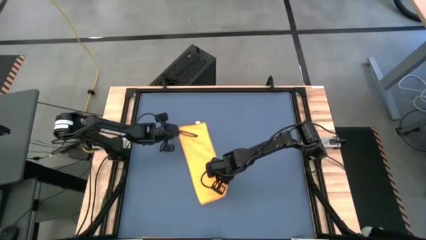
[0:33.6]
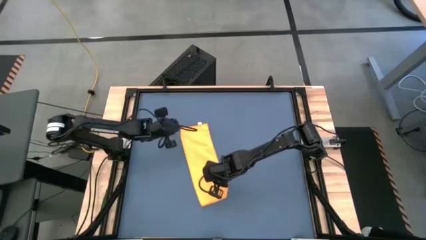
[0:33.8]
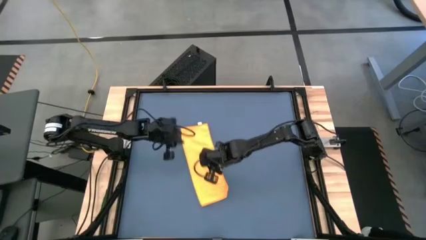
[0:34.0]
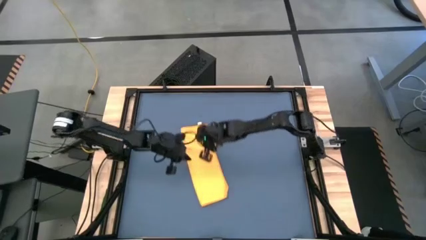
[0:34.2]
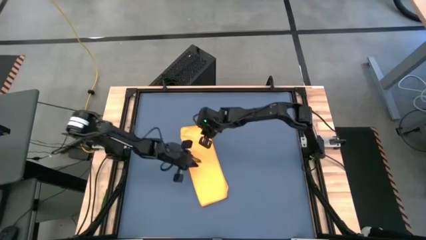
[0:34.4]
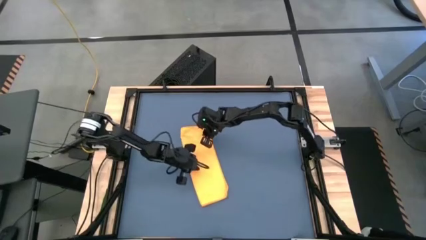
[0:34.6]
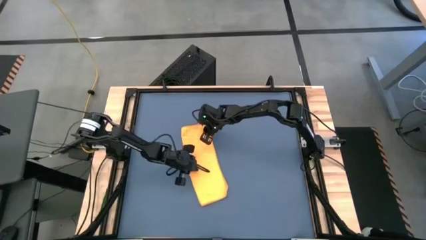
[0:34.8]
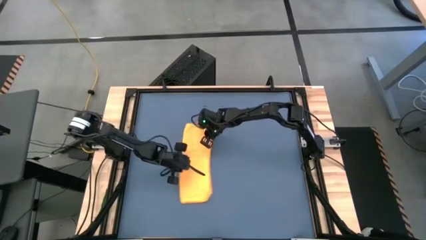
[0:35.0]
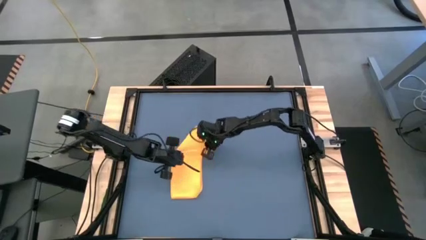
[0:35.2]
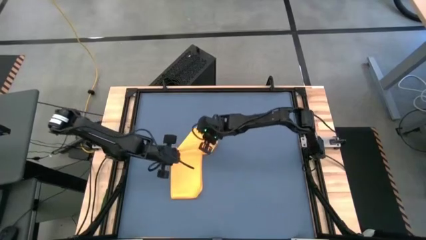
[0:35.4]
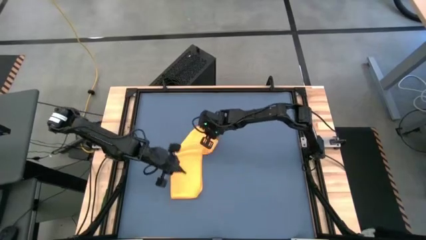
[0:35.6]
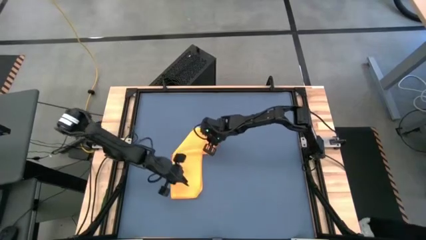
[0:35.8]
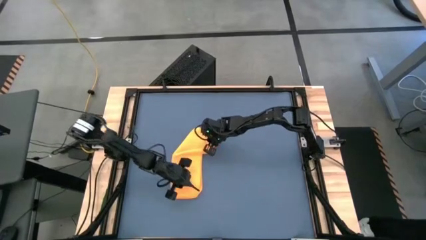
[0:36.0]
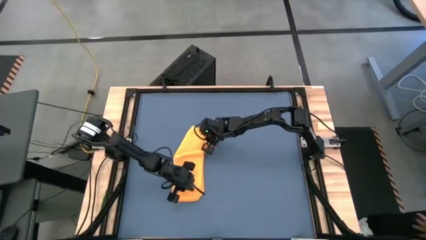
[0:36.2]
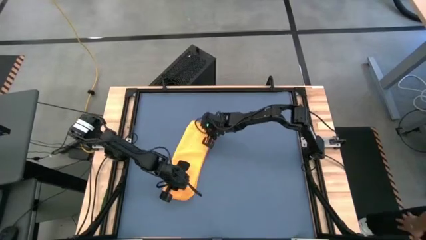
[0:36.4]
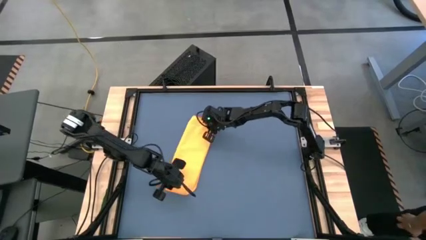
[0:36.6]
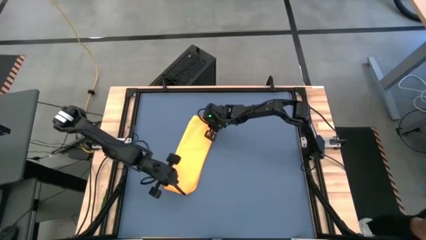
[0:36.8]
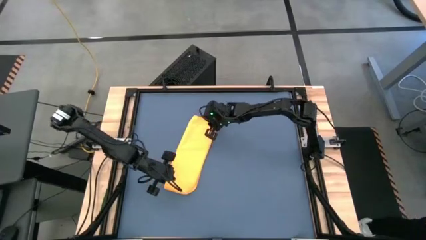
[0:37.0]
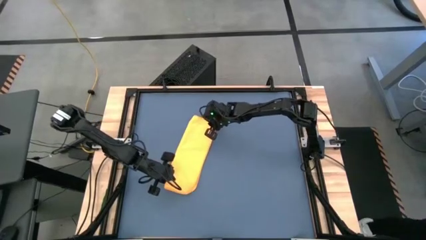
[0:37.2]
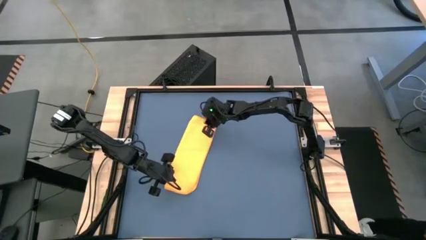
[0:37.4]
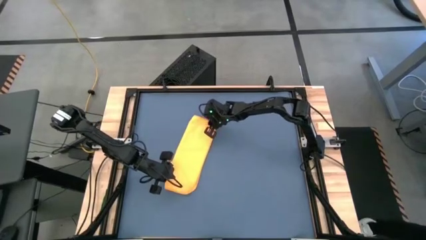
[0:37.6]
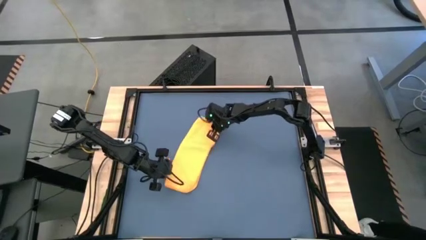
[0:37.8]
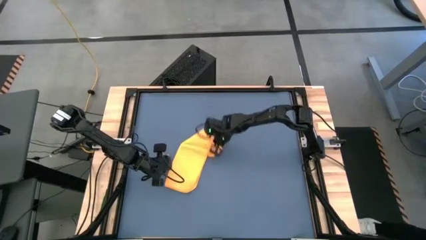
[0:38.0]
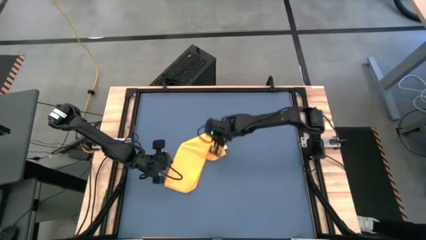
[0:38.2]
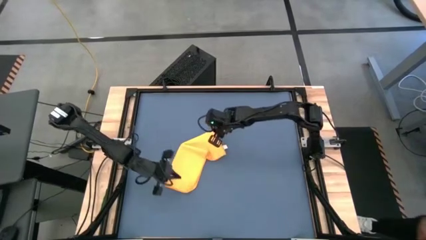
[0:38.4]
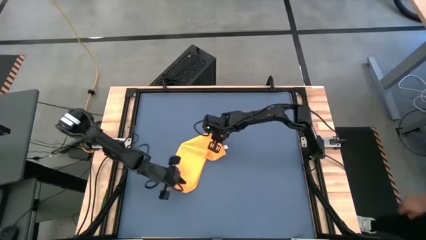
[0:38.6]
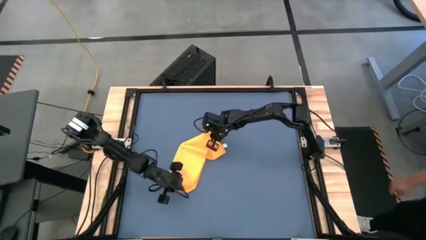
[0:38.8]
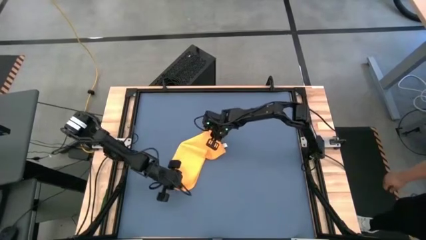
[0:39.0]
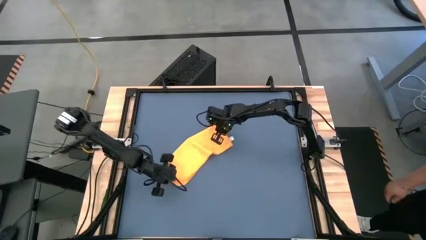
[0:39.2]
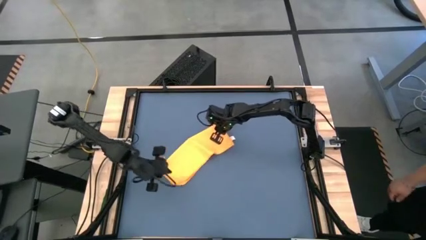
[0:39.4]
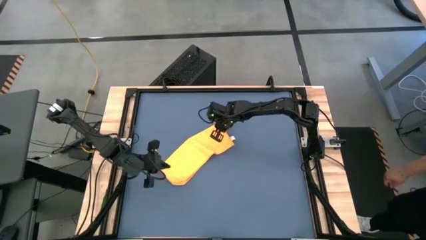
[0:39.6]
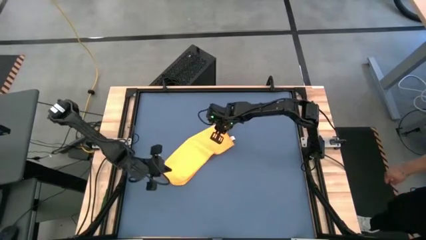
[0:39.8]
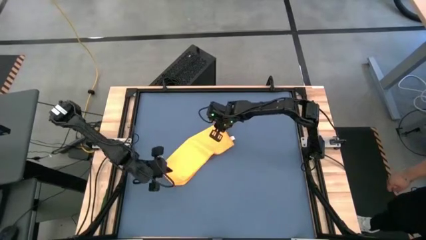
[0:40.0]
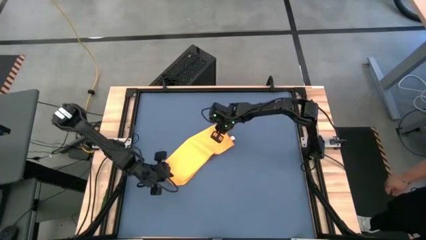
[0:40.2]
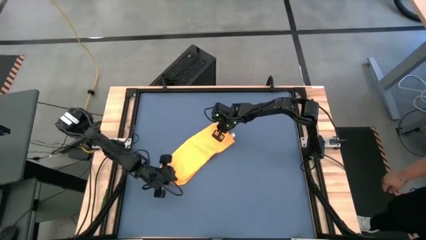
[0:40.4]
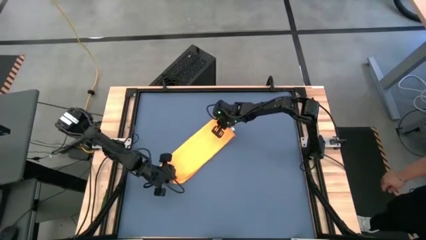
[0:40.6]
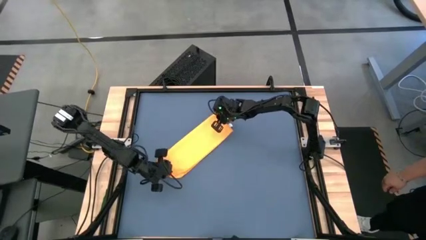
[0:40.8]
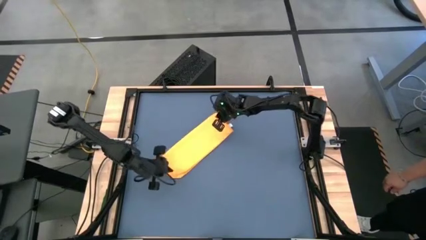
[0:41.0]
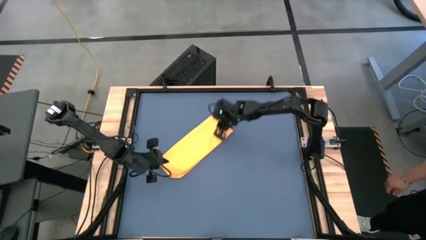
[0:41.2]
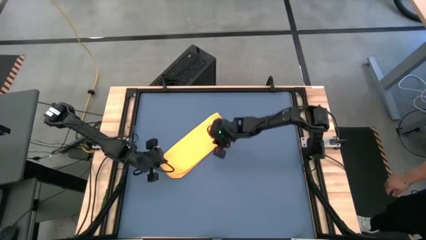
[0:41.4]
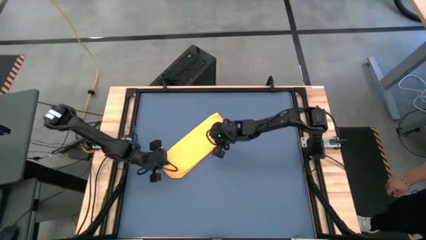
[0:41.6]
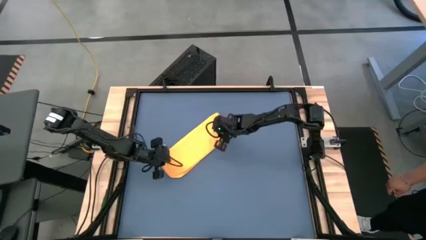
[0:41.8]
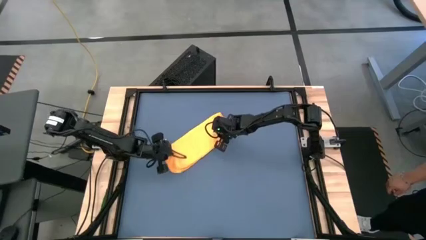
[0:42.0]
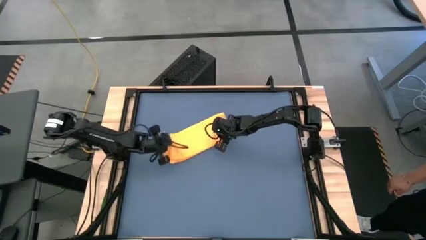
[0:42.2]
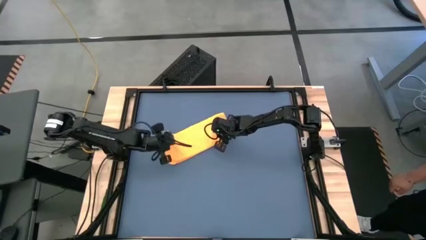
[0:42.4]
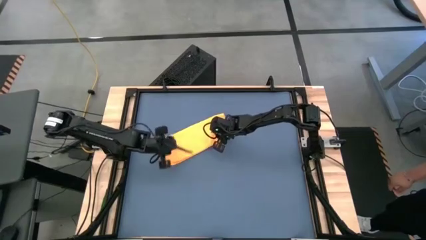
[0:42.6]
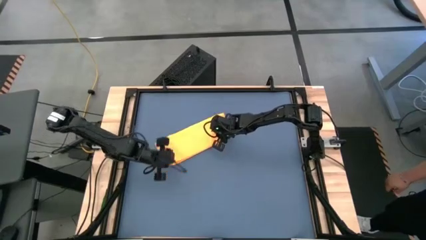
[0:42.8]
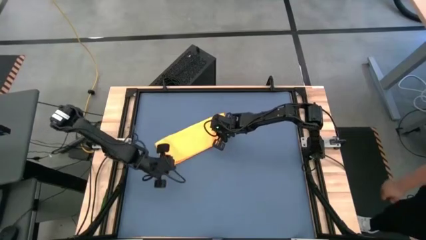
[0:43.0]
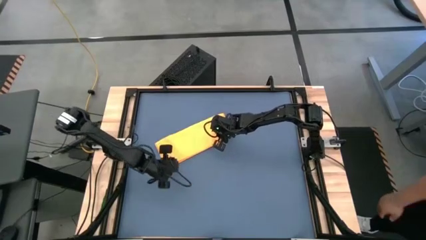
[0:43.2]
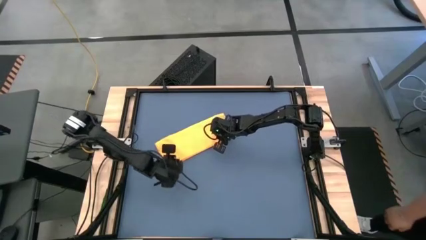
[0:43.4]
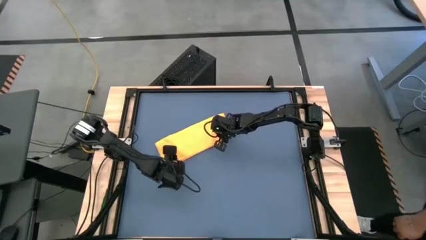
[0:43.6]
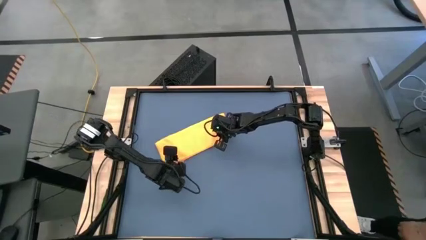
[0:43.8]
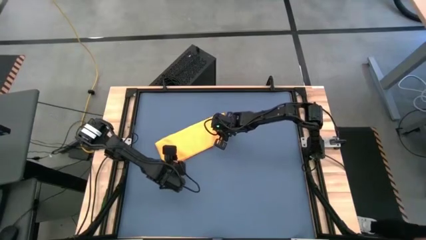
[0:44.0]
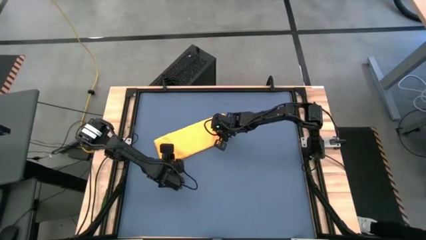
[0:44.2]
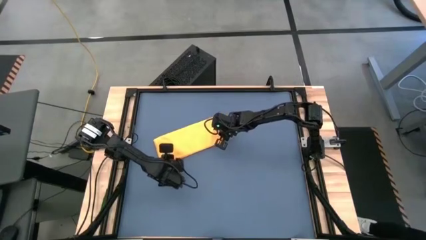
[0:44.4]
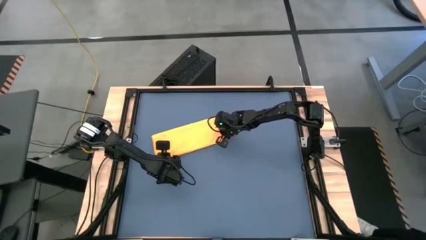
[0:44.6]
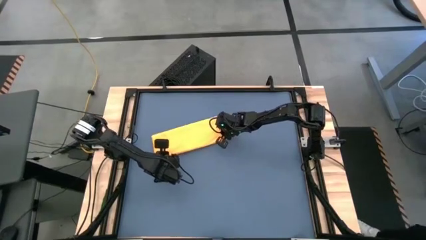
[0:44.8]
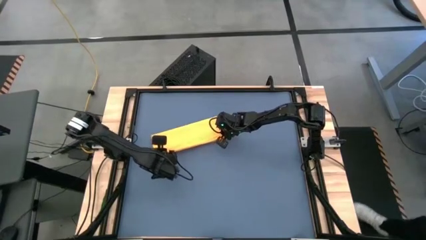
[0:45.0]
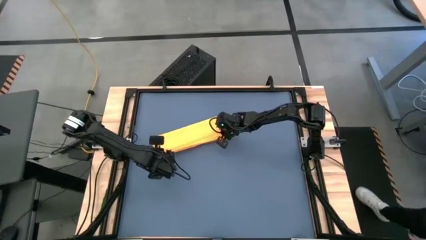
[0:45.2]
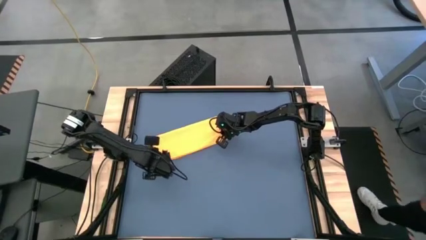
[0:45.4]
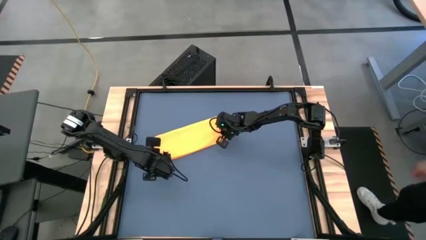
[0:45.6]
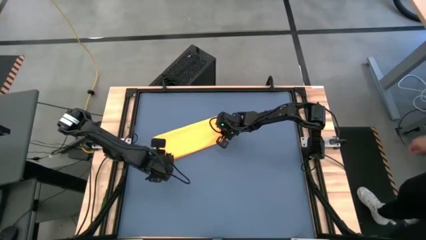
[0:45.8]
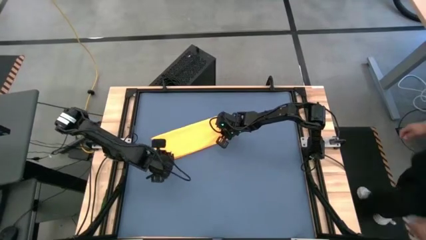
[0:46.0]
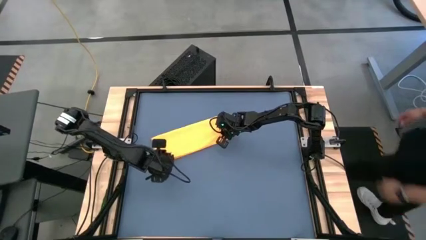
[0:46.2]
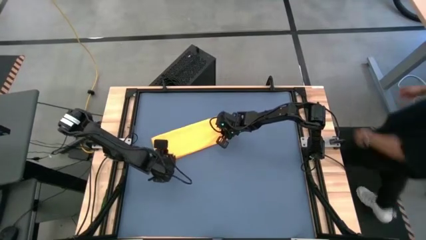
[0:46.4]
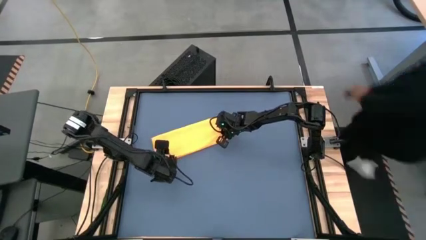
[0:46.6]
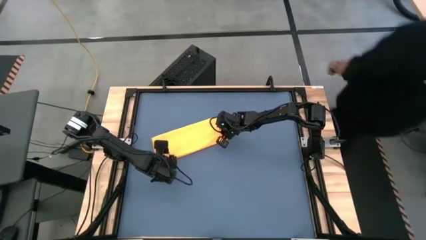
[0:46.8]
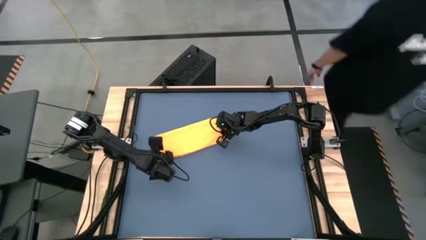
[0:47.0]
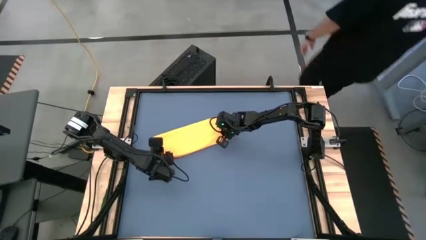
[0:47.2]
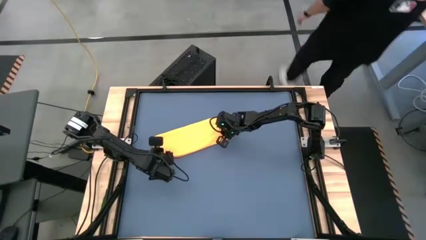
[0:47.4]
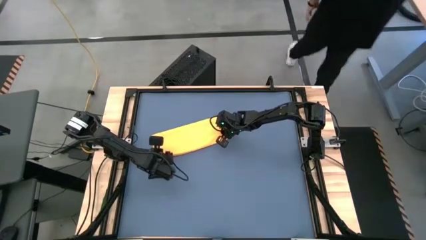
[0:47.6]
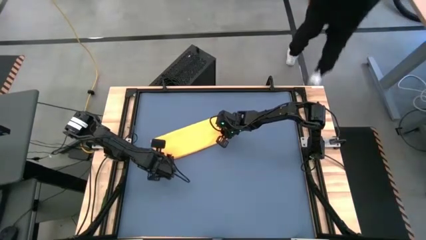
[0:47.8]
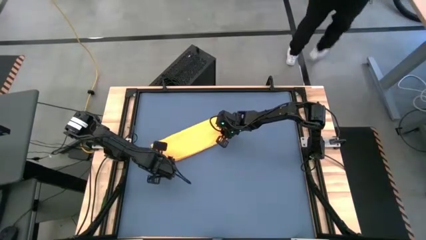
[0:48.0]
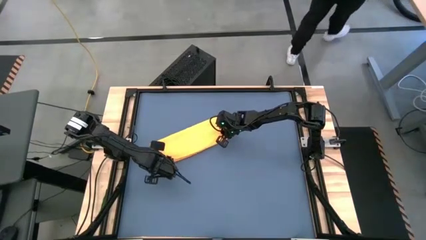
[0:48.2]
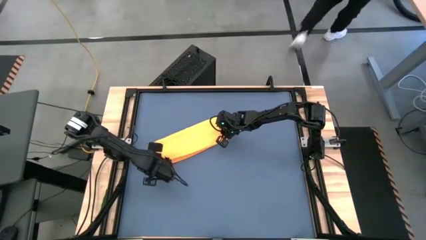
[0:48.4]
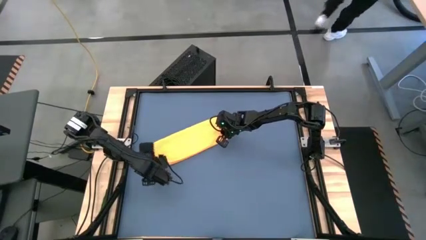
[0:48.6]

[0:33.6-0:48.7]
Task: Roll towel
Fold the yellow microfiber cloth
